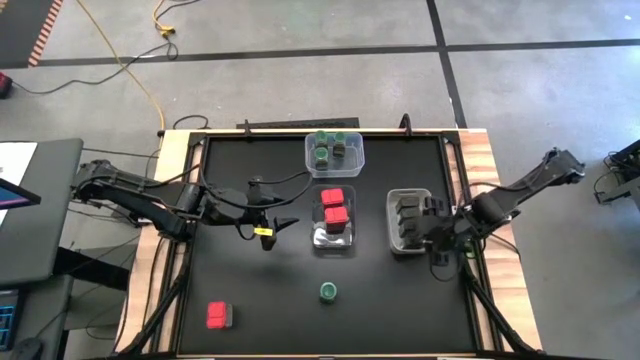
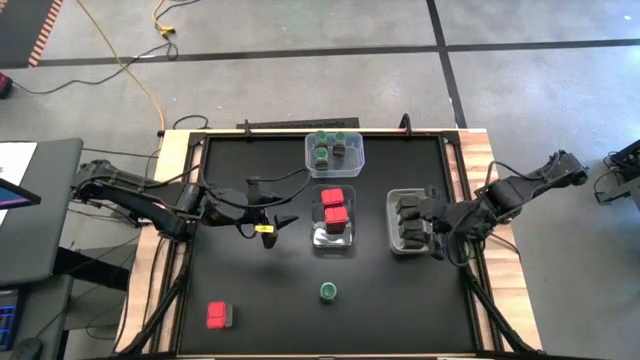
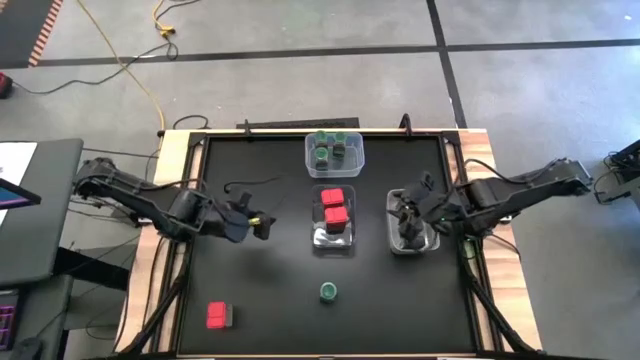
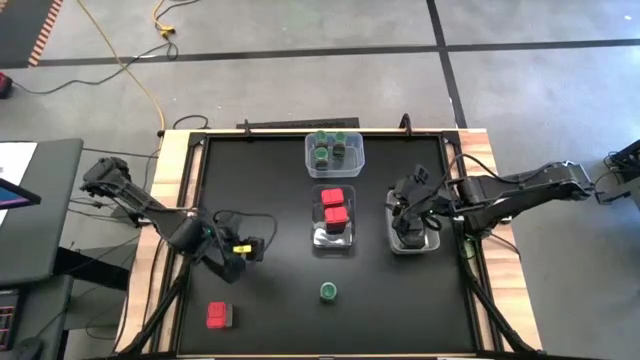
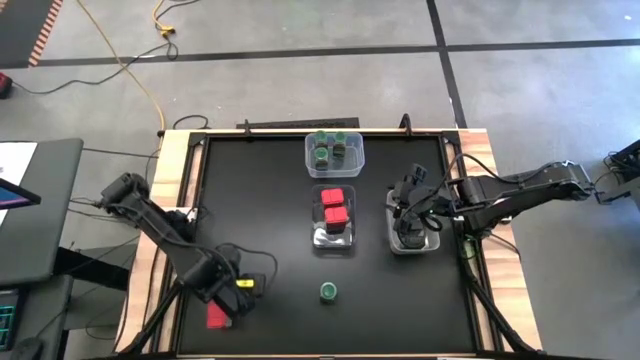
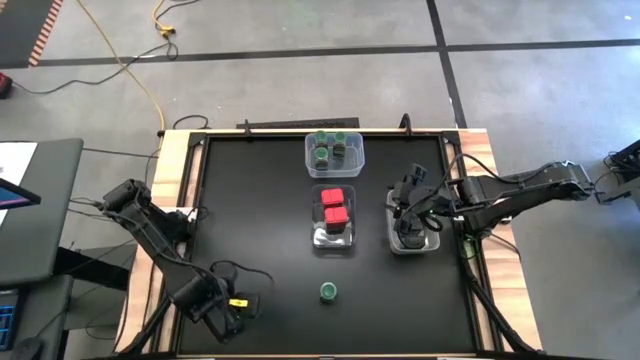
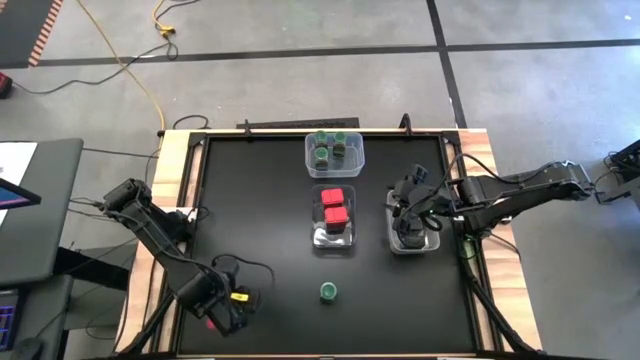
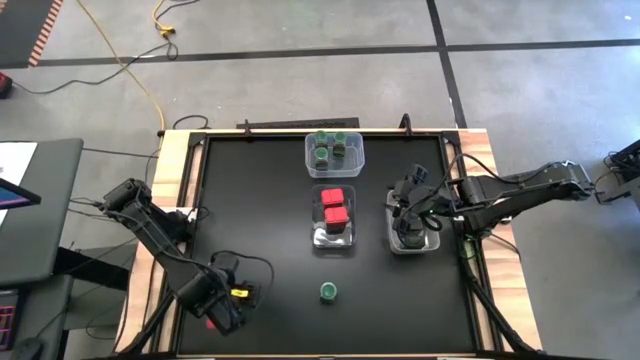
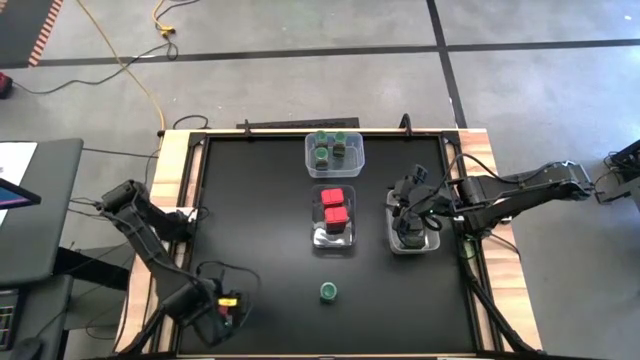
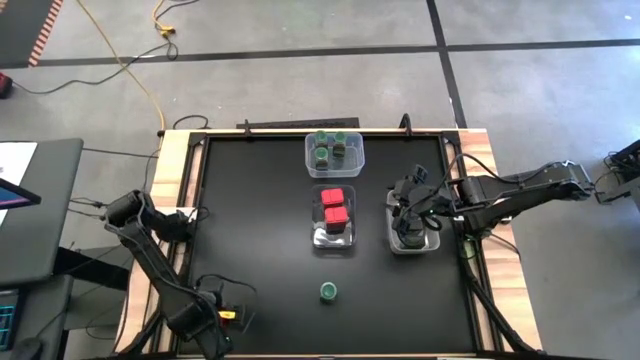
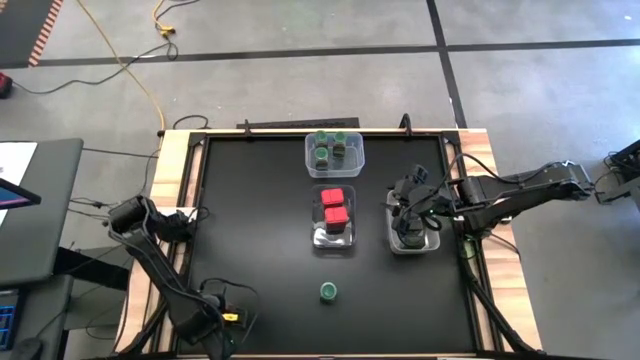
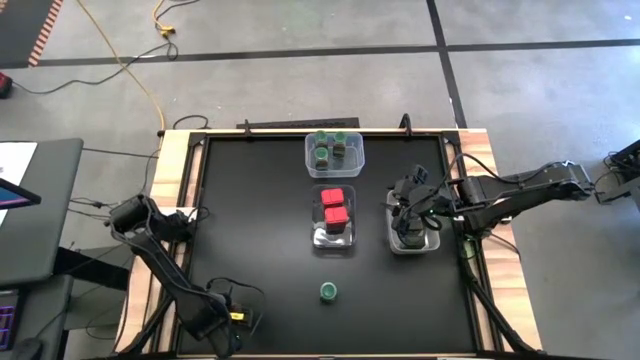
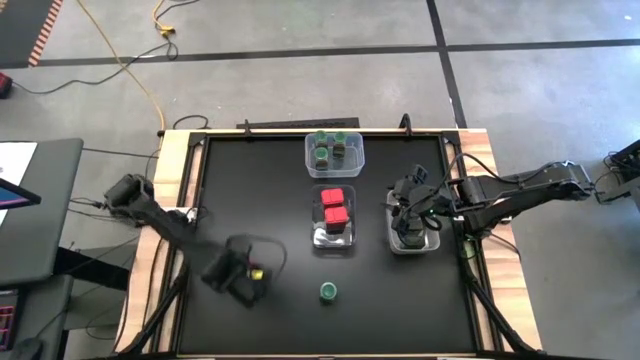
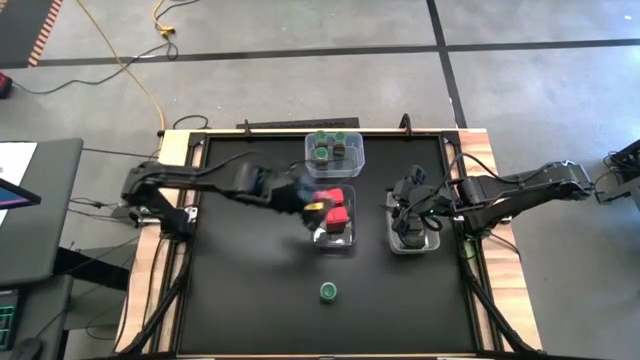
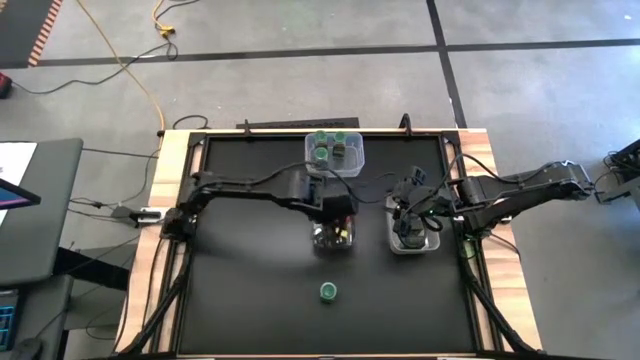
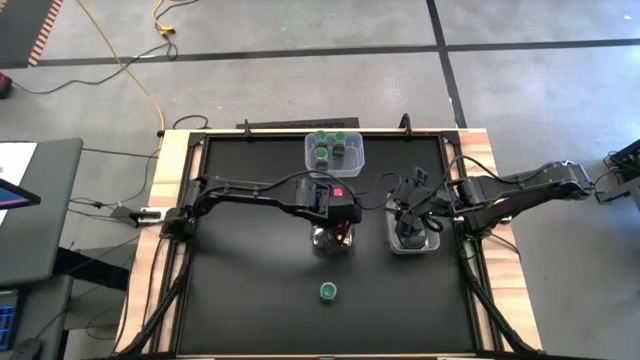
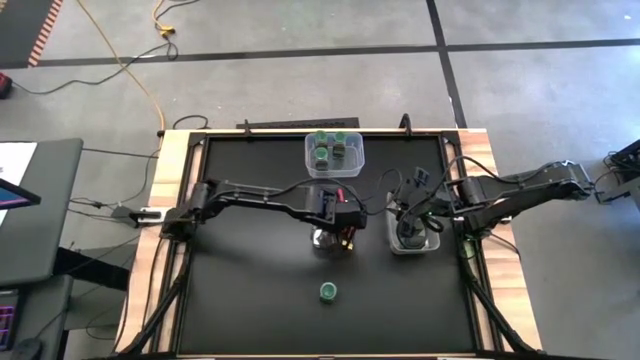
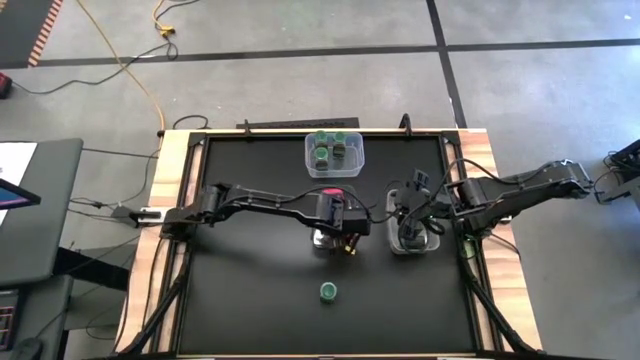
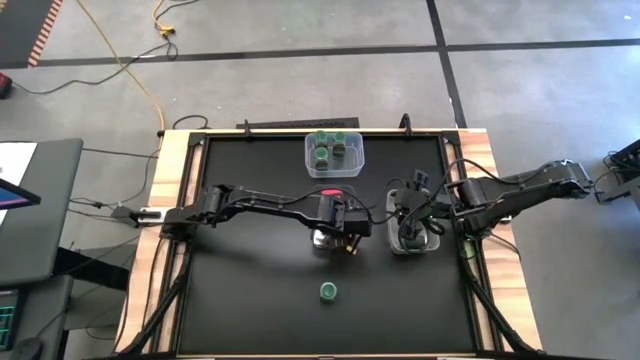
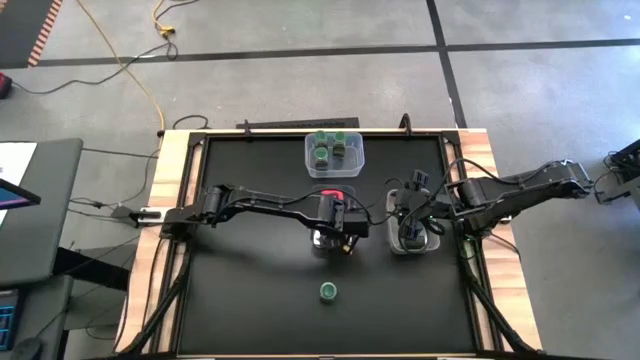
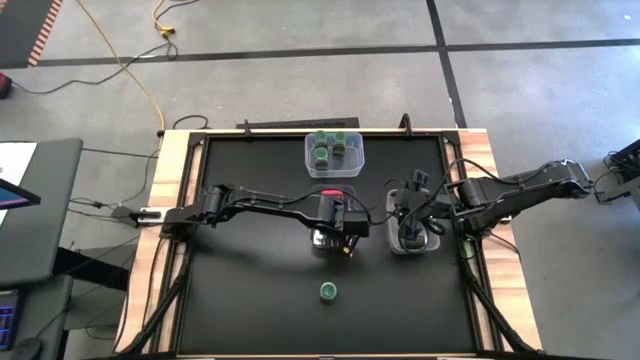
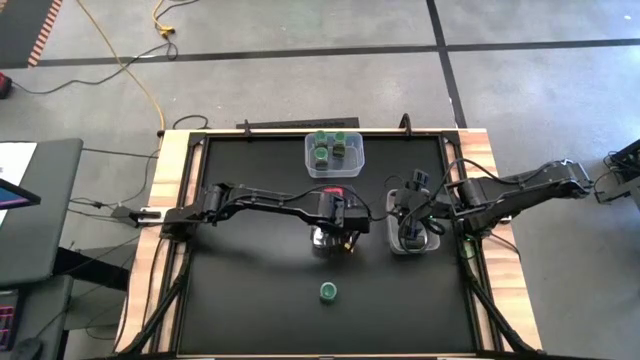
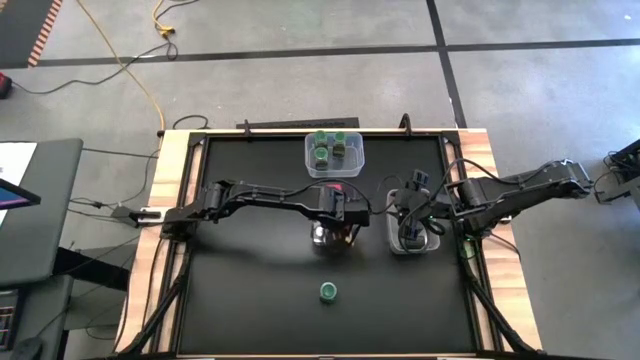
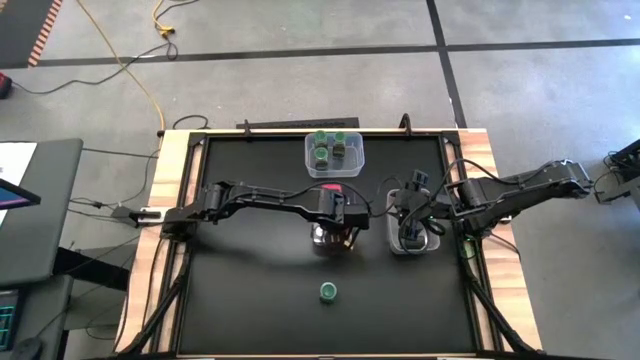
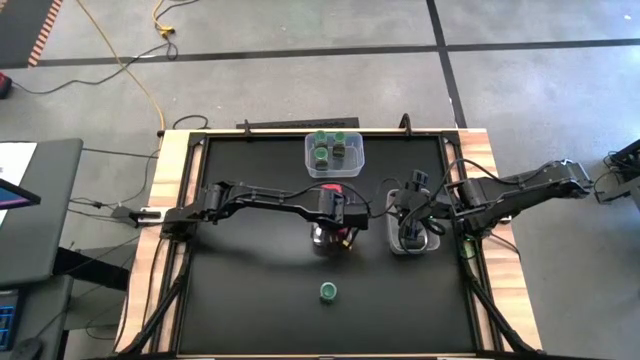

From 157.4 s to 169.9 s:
Task: Sort spices by type
Put the red seasoning can into the black transparent bin

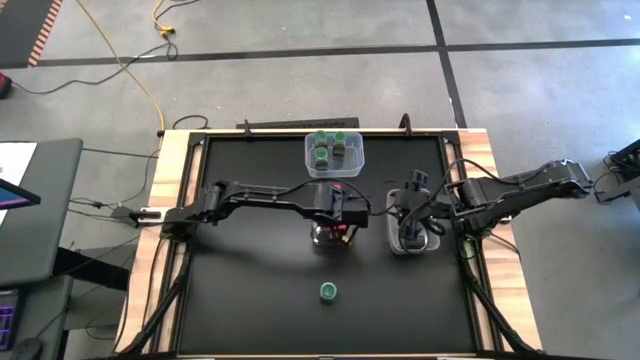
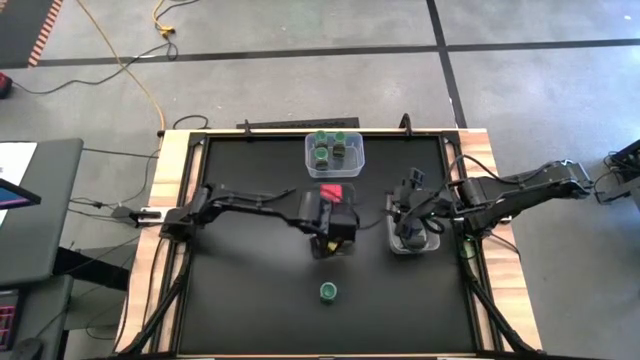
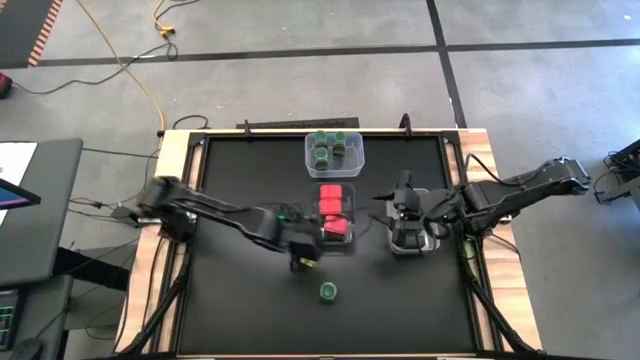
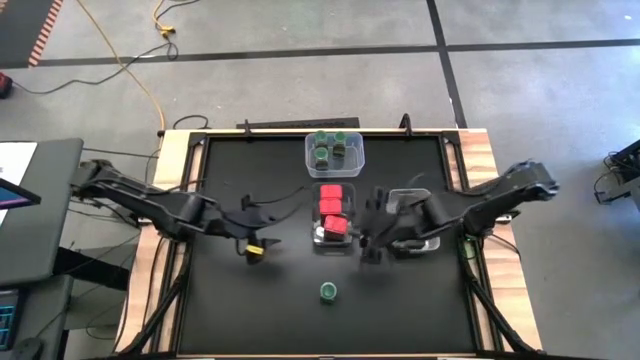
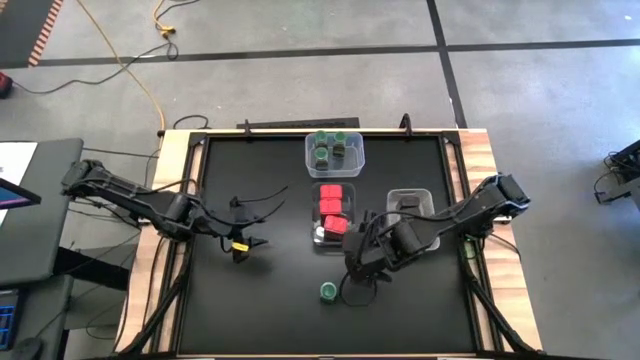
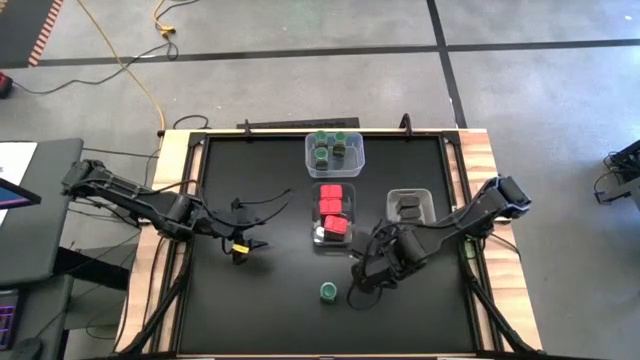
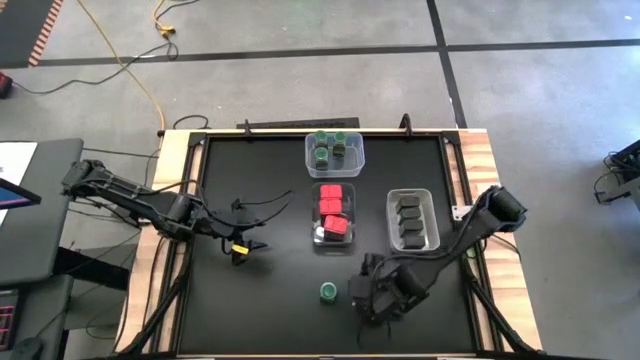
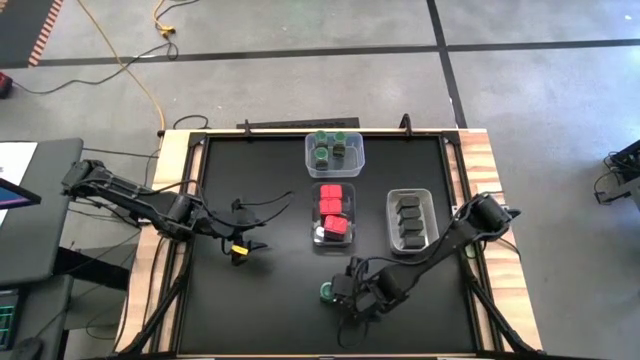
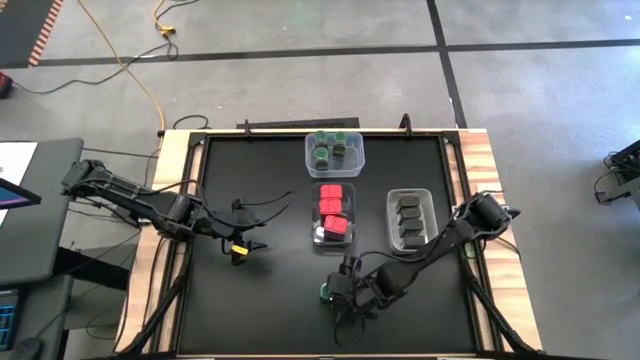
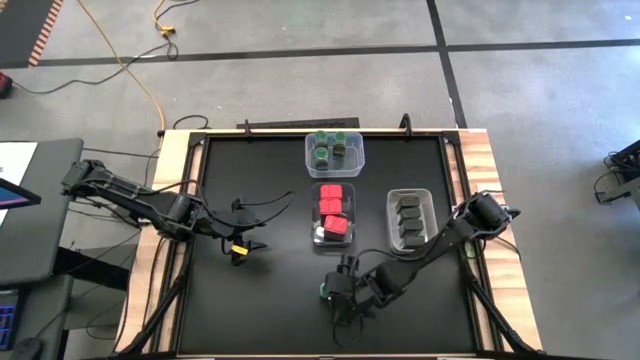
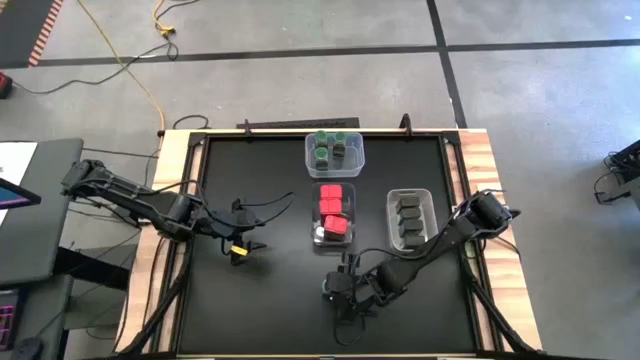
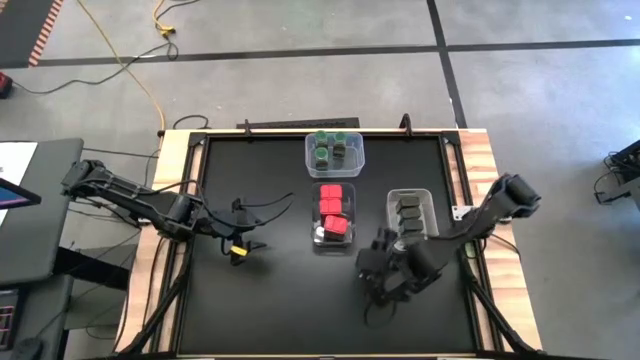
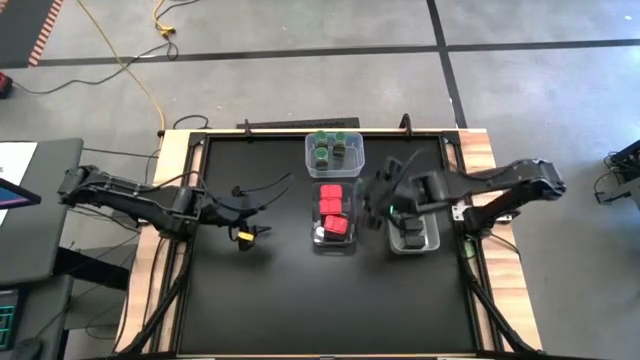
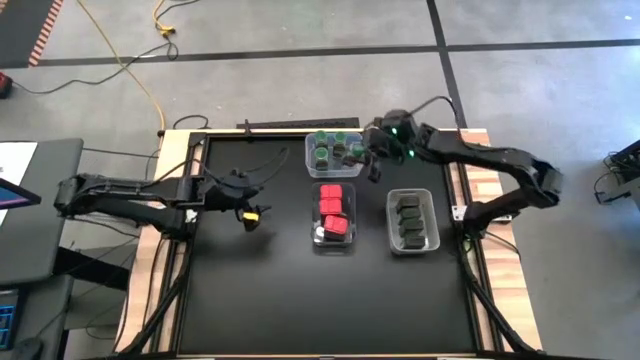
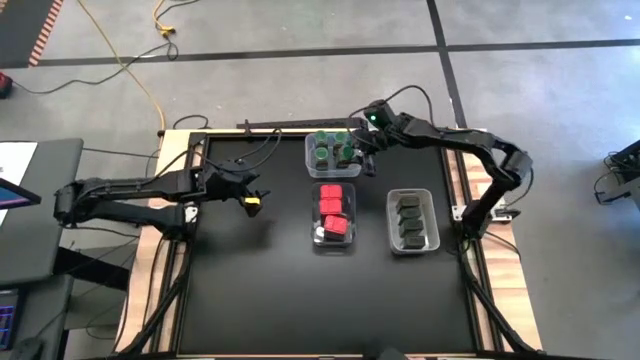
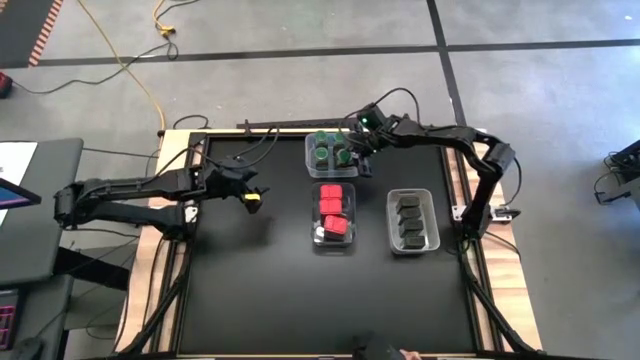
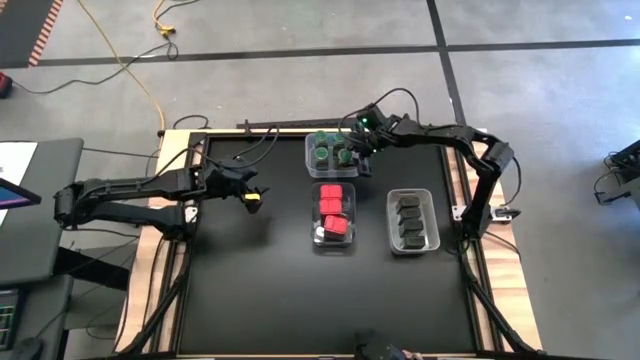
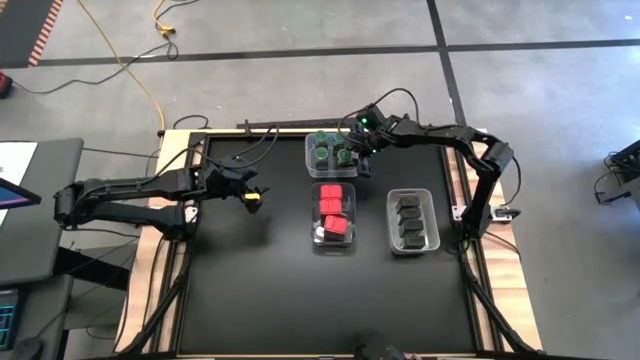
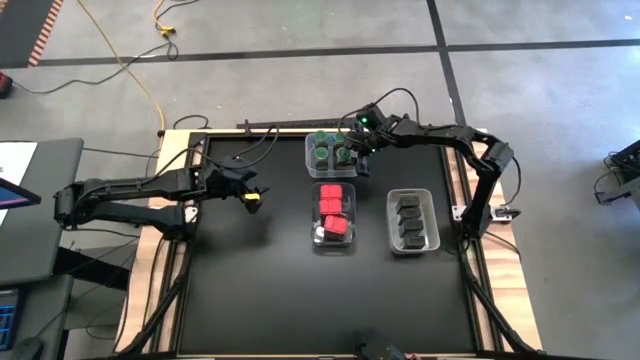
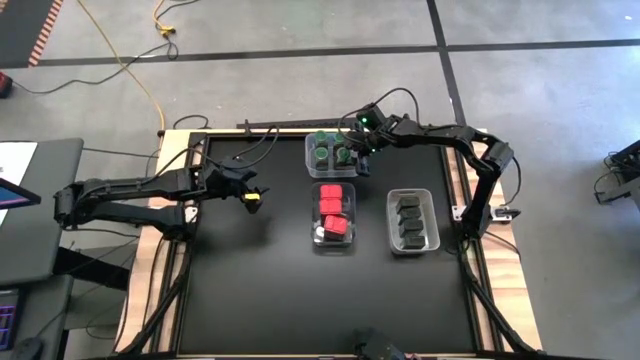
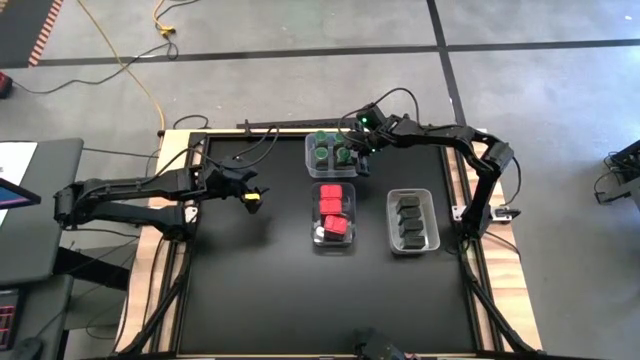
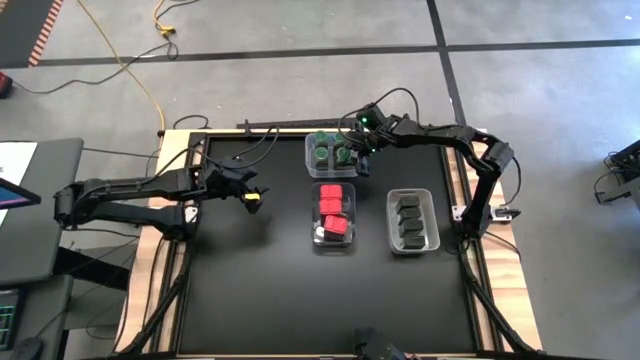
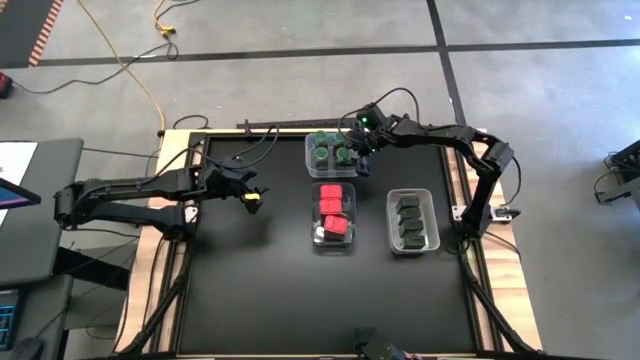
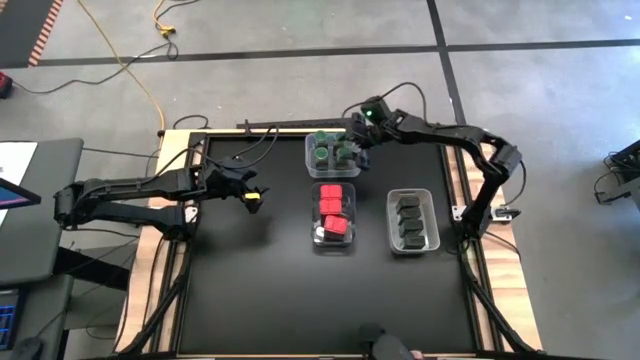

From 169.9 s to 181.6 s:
Put the green seasoning bottle into the transparent bin
